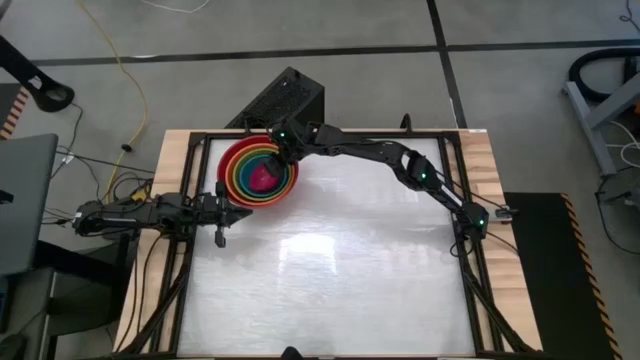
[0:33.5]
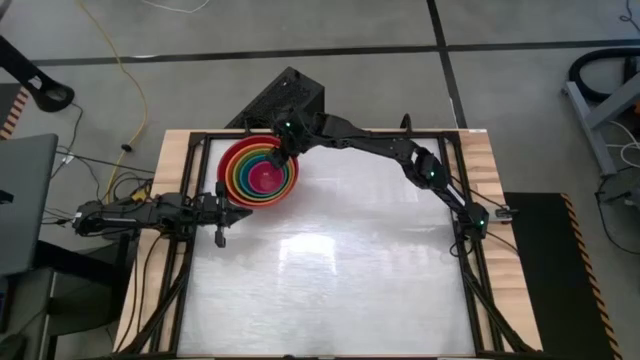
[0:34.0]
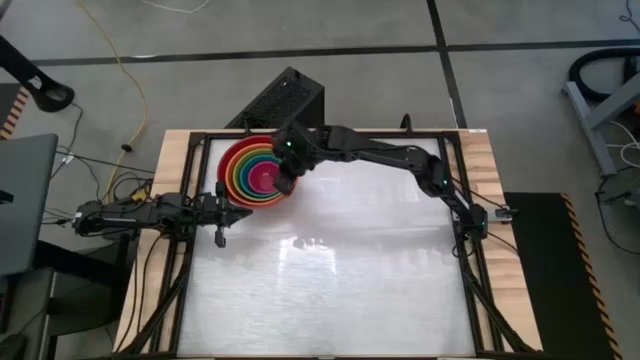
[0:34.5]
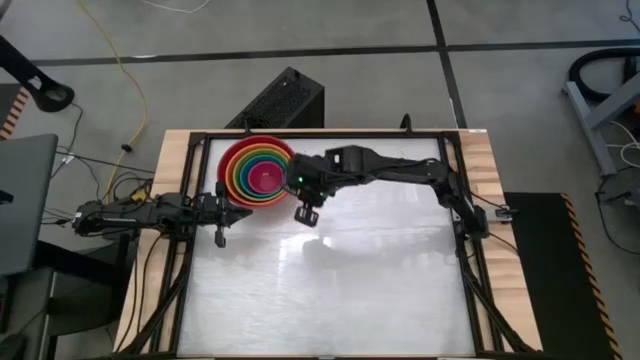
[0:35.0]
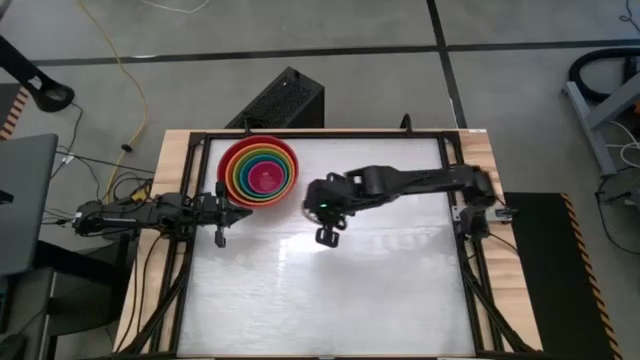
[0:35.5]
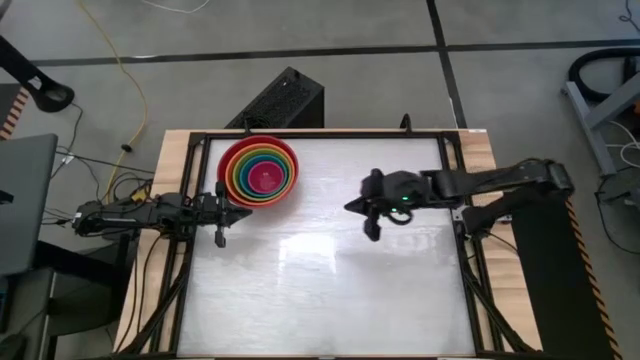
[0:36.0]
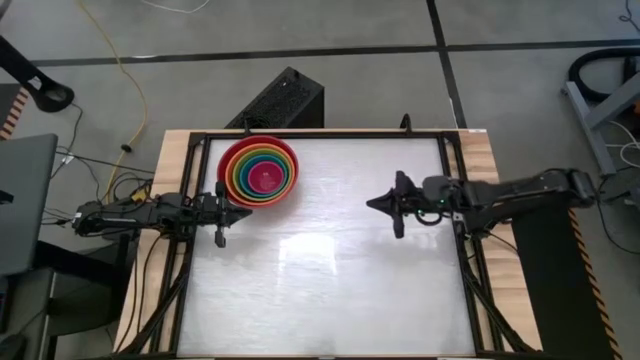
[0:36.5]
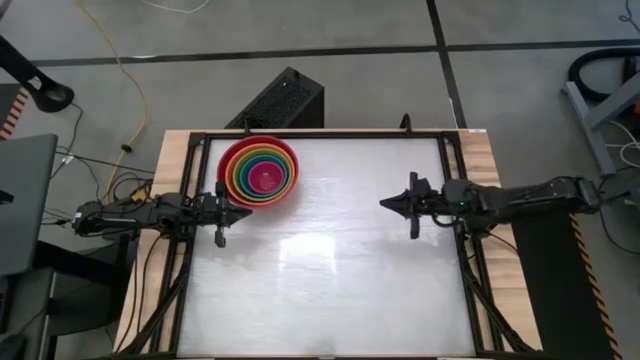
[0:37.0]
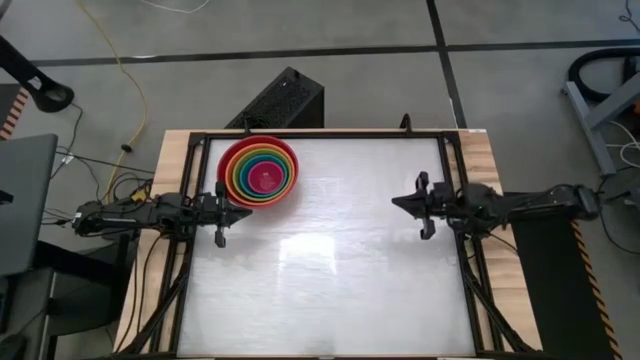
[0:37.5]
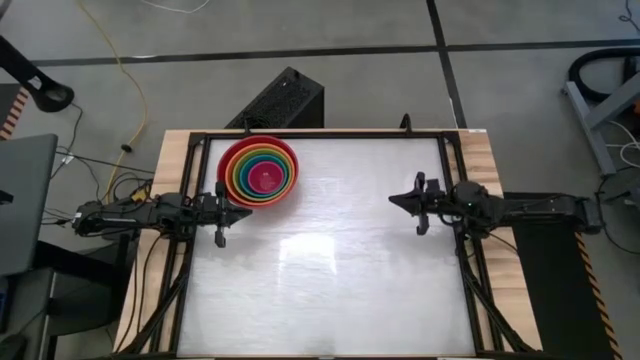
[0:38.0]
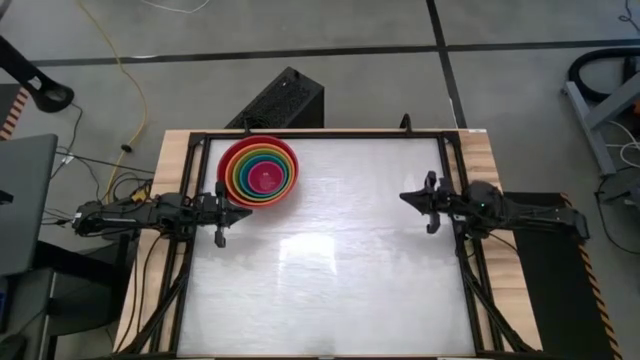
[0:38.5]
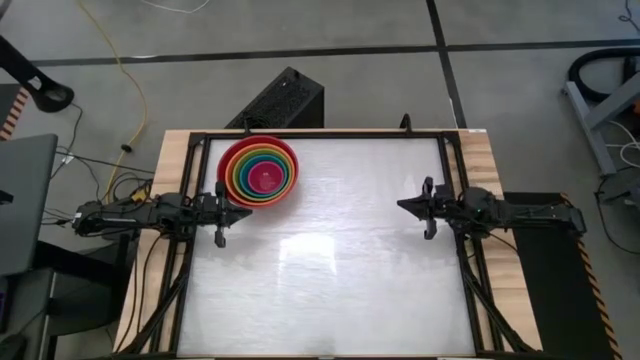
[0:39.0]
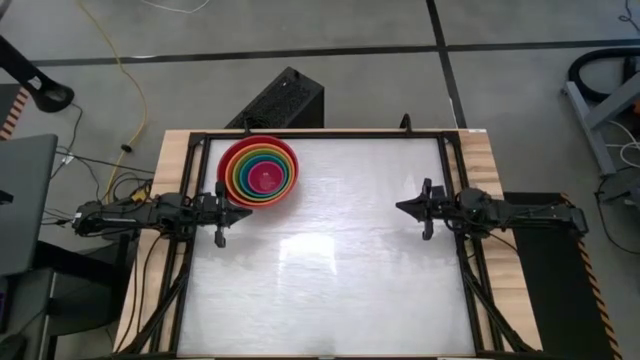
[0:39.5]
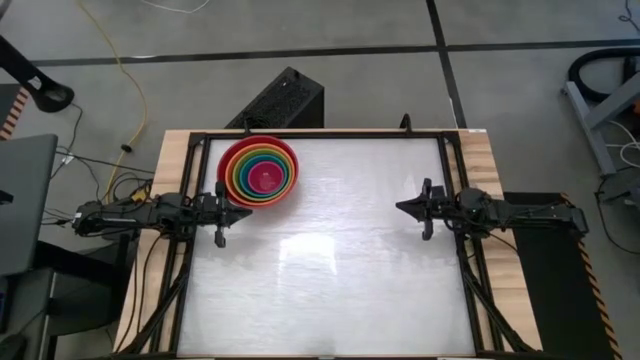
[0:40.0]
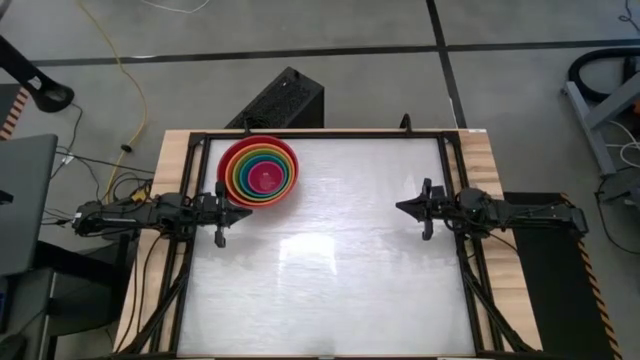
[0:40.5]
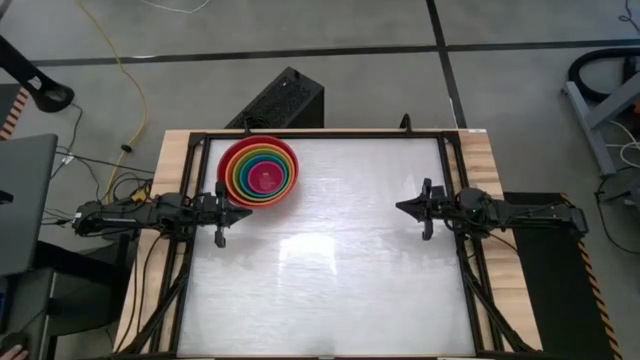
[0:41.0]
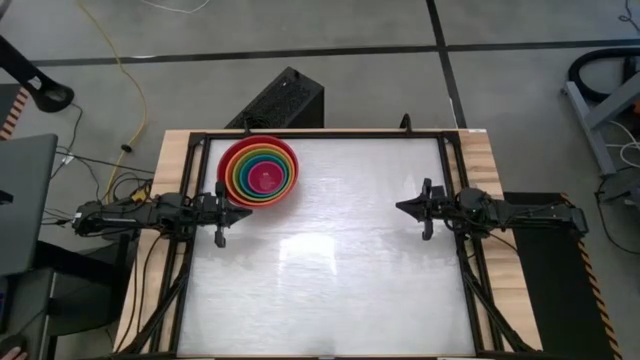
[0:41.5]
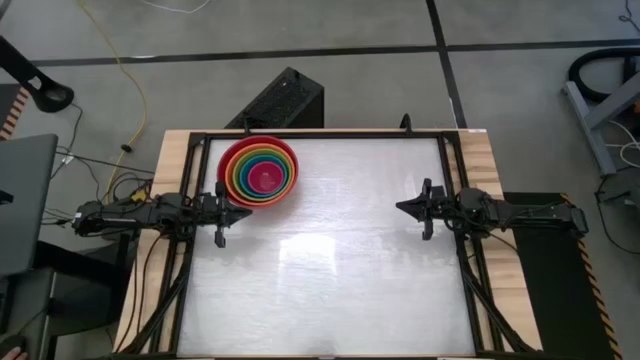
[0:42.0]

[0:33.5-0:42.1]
Return to Home Position

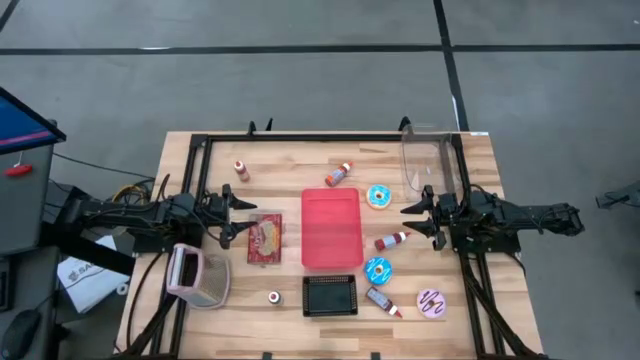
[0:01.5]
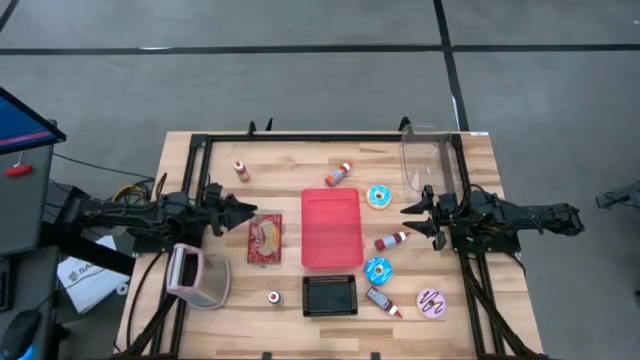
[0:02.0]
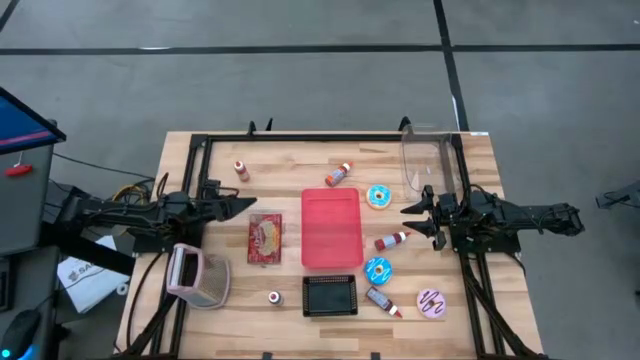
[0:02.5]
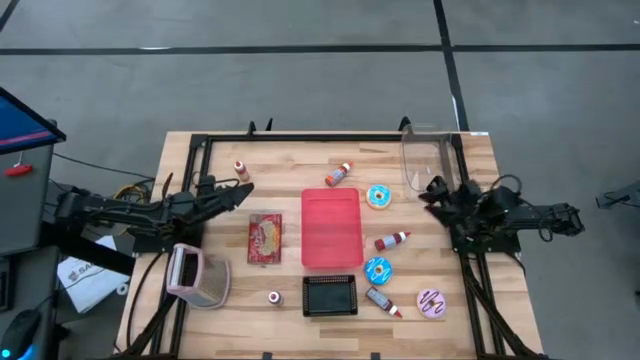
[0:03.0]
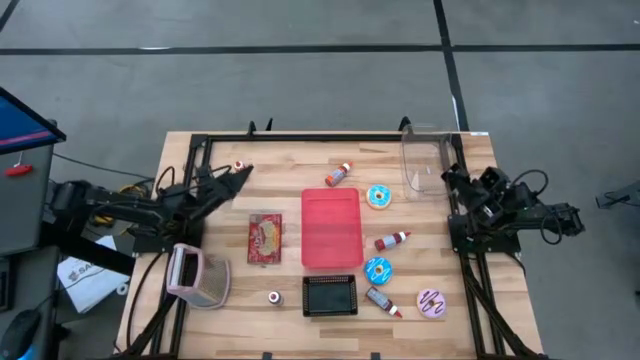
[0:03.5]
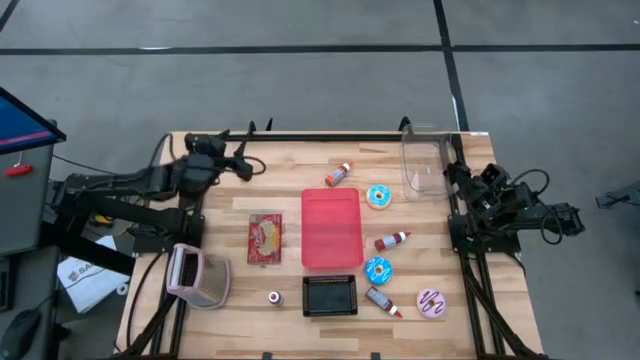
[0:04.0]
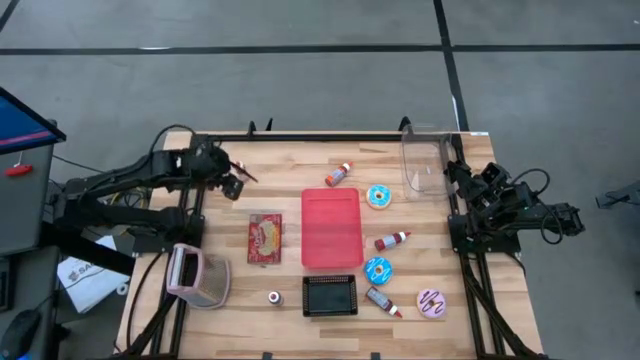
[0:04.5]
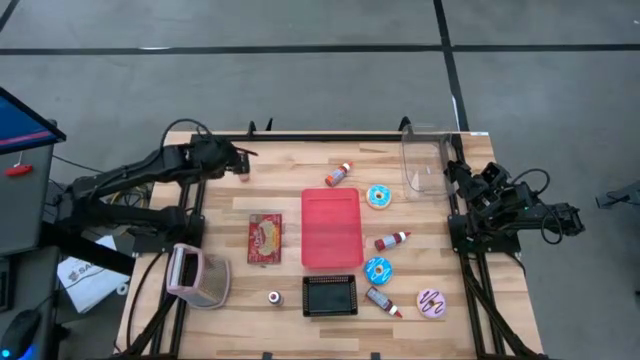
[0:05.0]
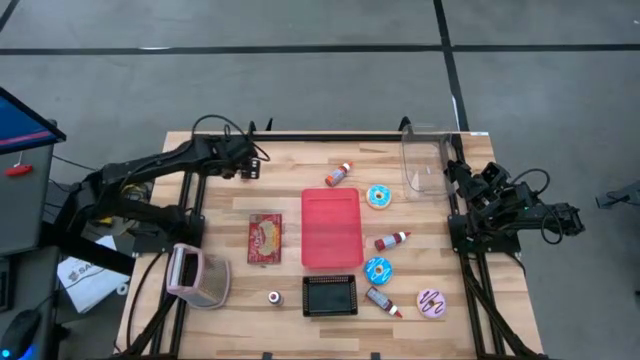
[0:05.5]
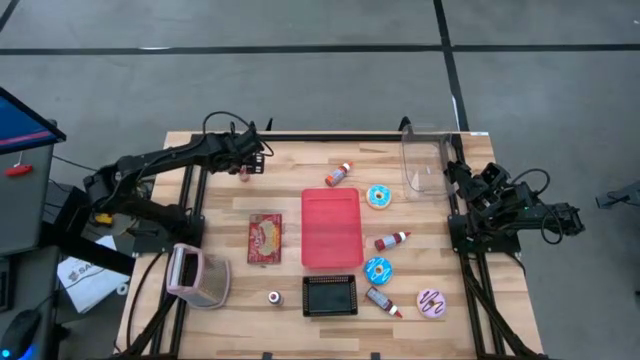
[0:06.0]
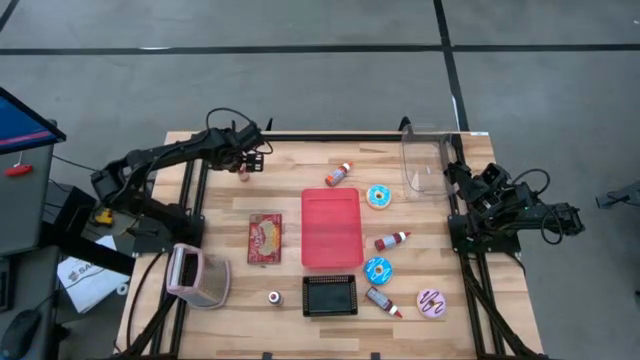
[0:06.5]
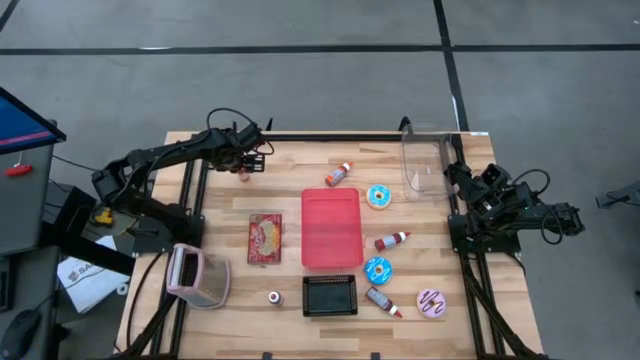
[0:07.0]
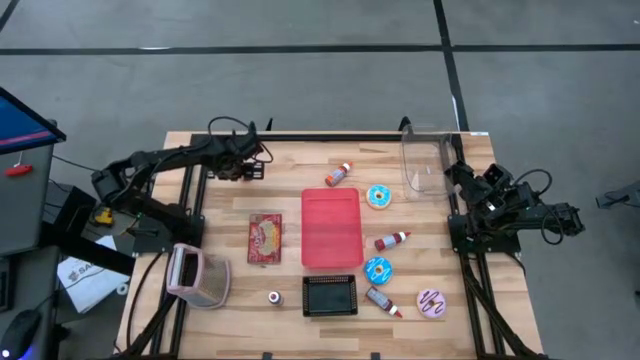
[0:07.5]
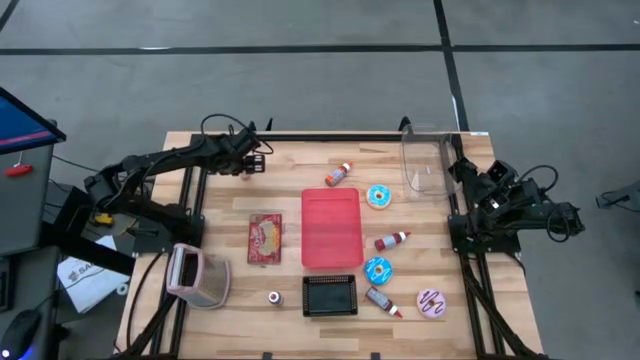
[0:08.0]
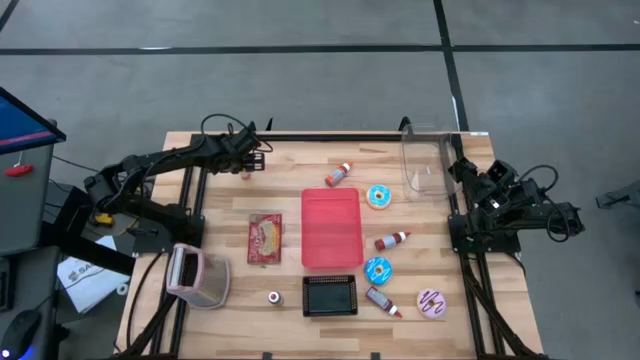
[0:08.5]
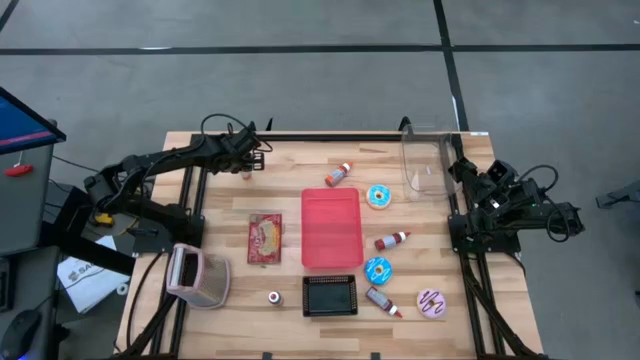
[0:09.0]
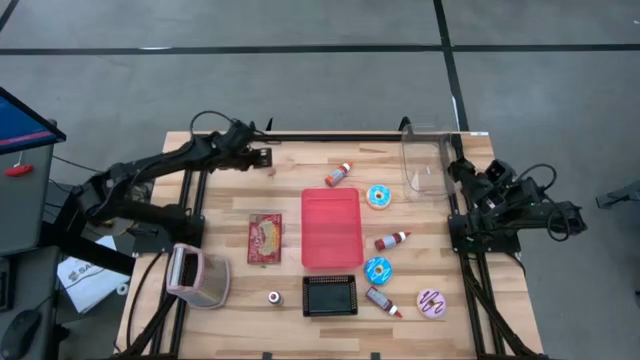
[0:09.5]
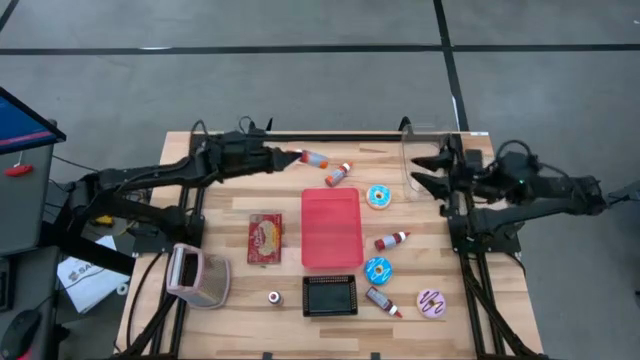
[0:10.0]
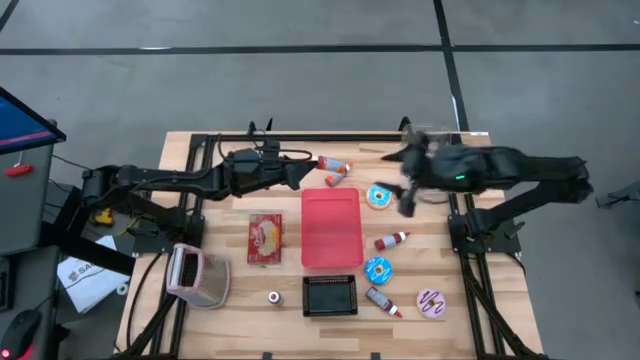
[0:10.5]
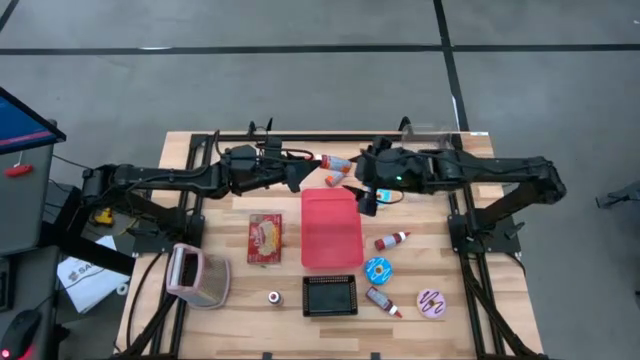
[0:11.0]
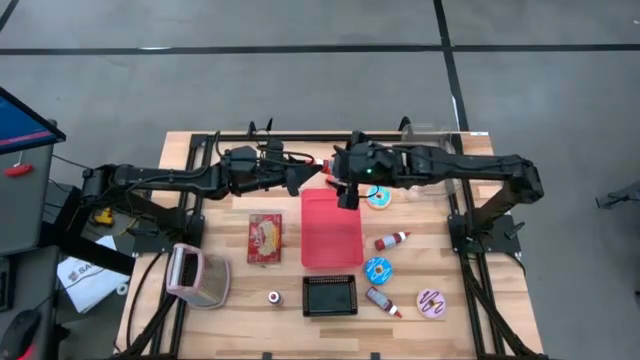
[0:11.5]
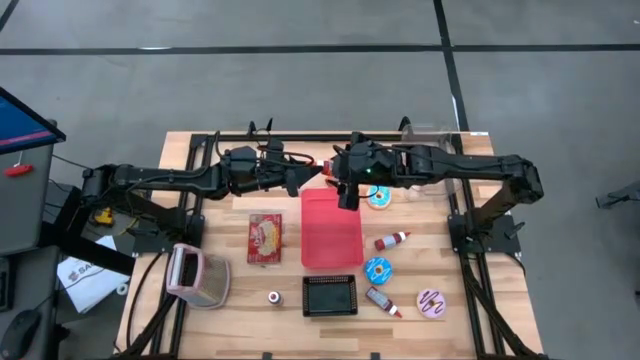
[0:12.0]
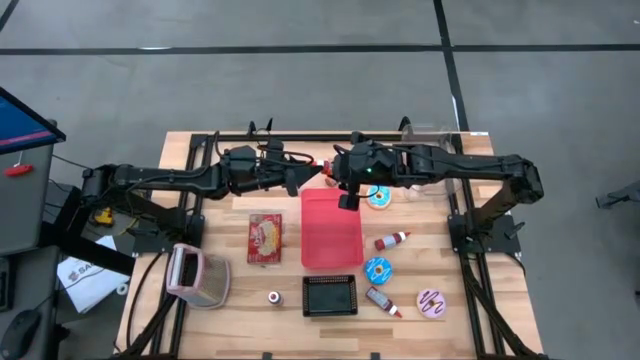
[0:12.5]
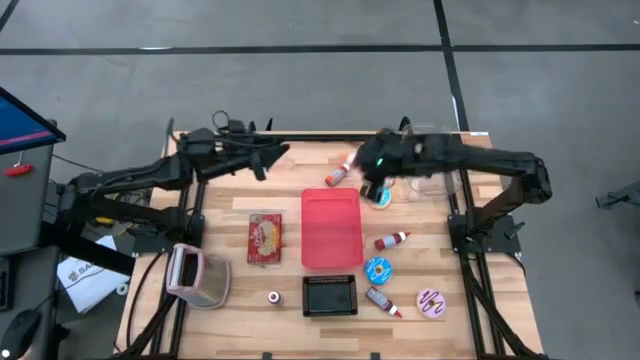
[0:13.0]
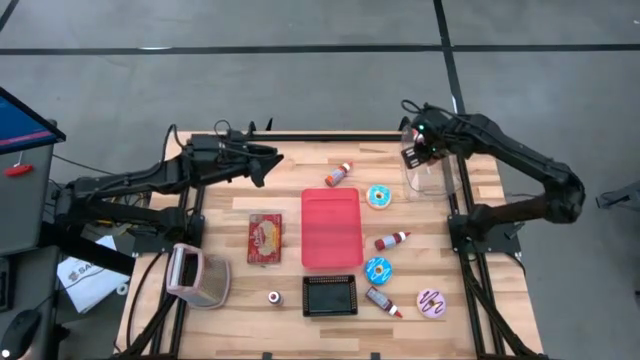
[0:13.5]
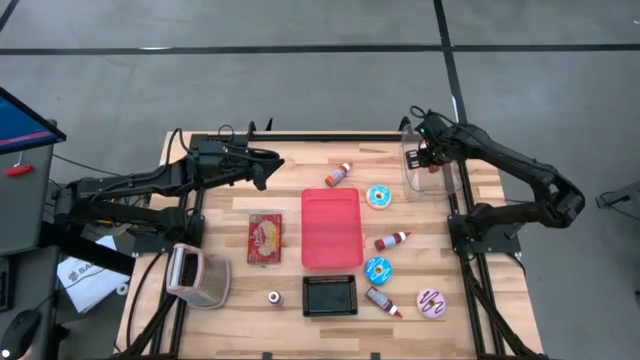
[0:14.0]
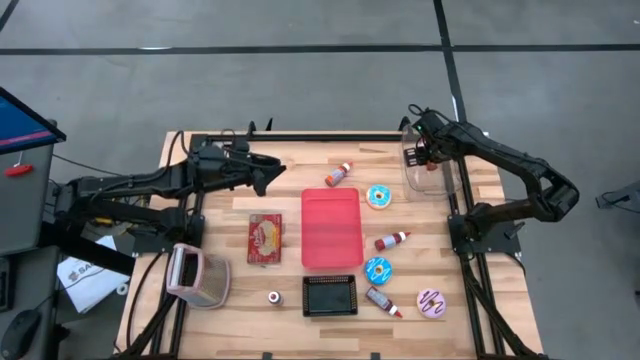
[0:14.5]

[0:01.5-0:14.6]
Put the left orange food coloring bottle into the transparent bin
